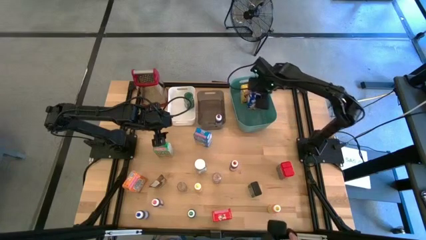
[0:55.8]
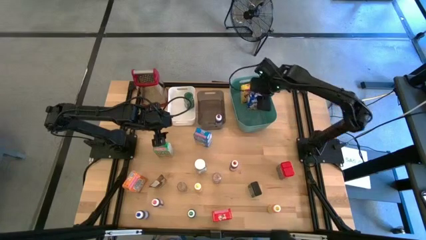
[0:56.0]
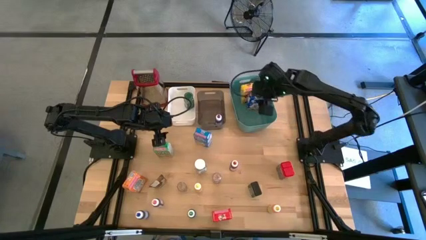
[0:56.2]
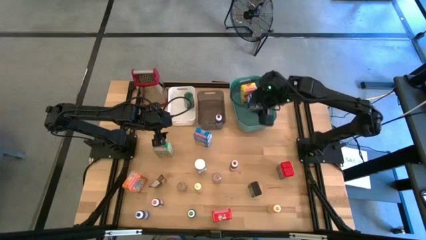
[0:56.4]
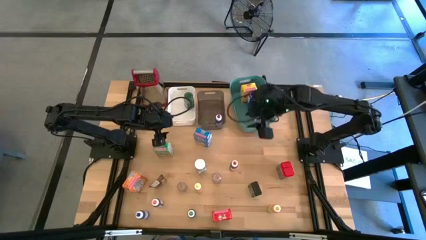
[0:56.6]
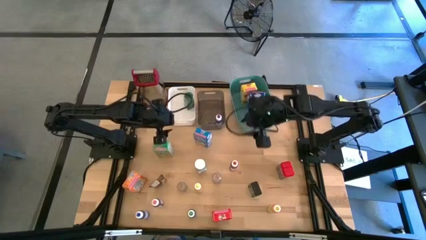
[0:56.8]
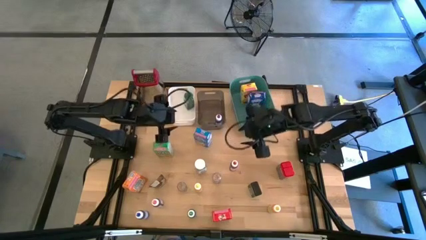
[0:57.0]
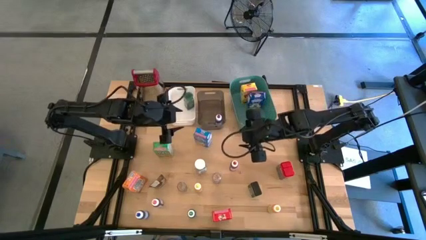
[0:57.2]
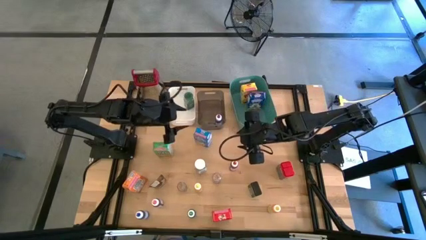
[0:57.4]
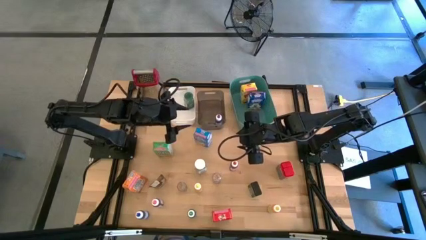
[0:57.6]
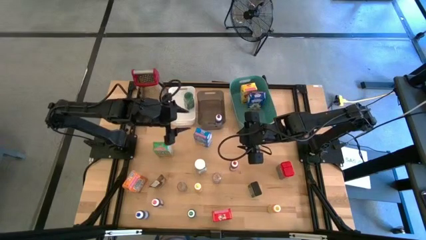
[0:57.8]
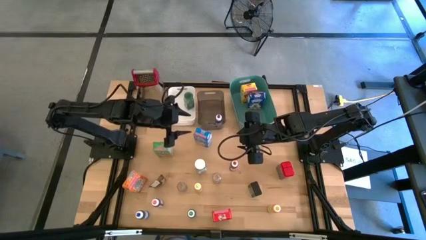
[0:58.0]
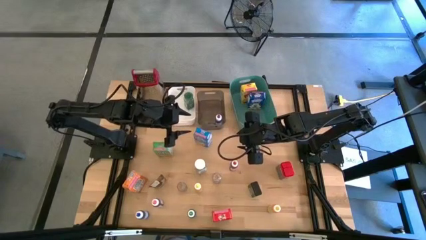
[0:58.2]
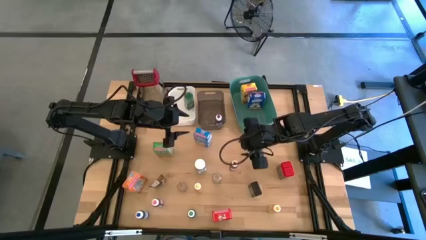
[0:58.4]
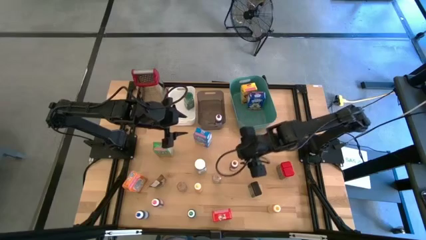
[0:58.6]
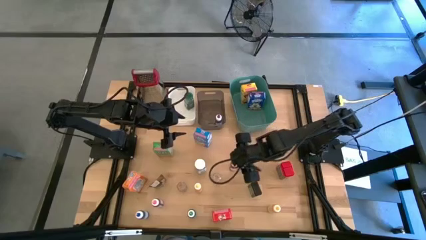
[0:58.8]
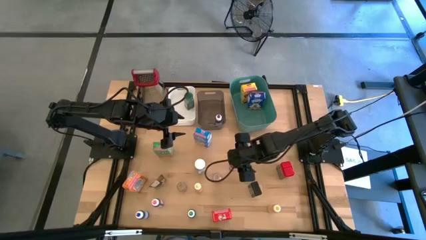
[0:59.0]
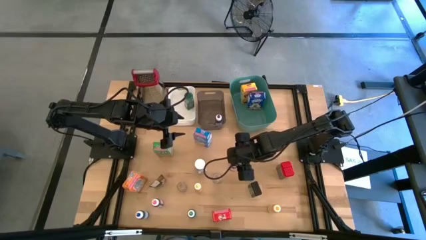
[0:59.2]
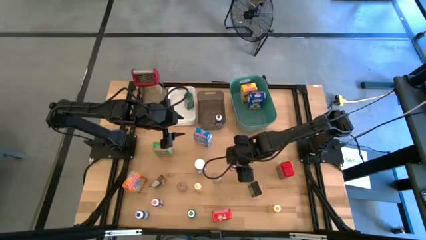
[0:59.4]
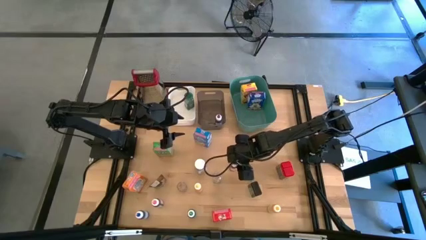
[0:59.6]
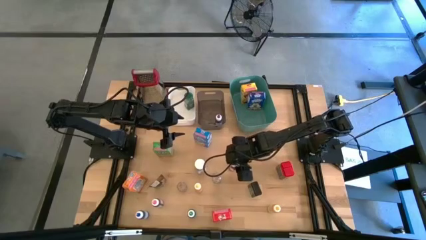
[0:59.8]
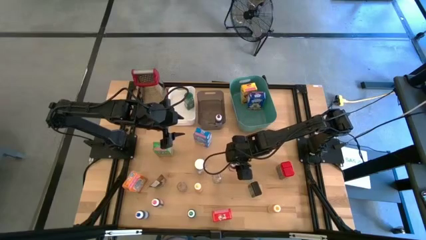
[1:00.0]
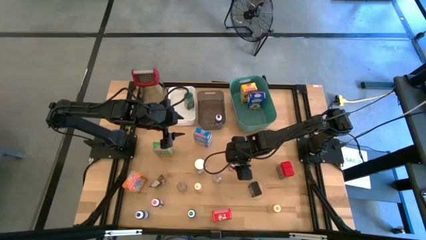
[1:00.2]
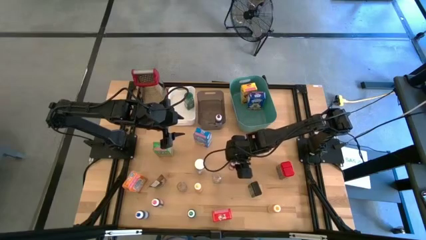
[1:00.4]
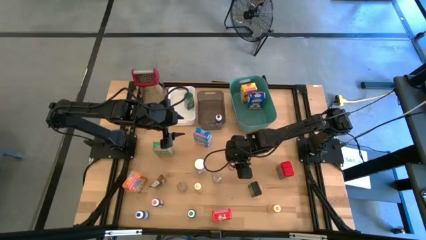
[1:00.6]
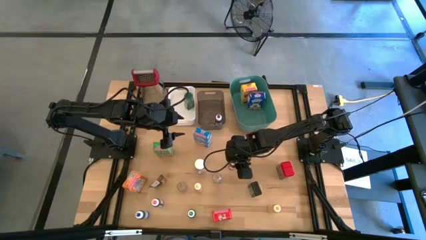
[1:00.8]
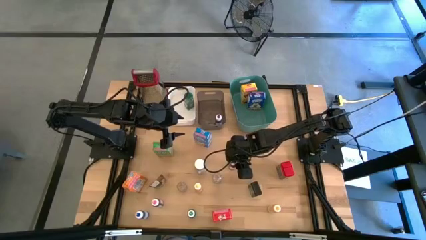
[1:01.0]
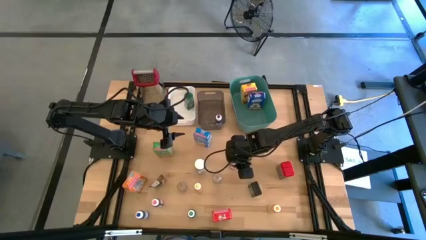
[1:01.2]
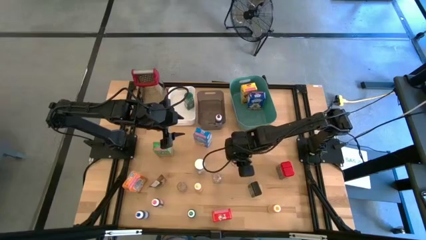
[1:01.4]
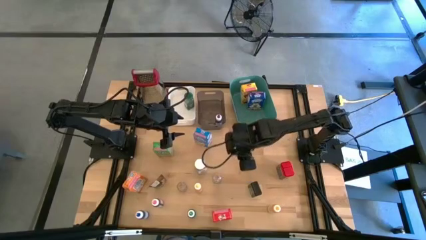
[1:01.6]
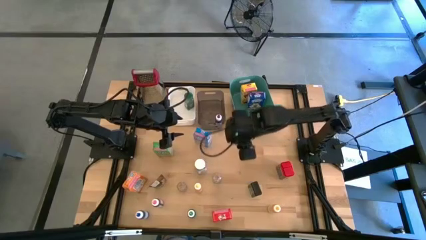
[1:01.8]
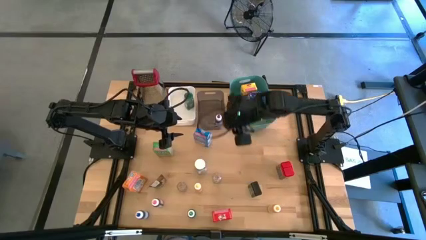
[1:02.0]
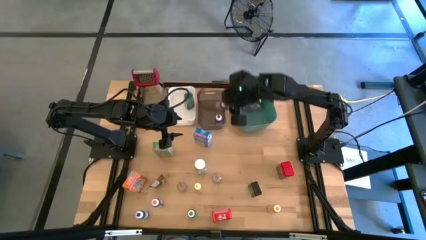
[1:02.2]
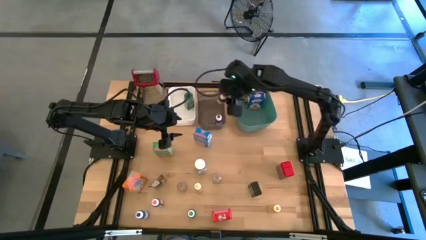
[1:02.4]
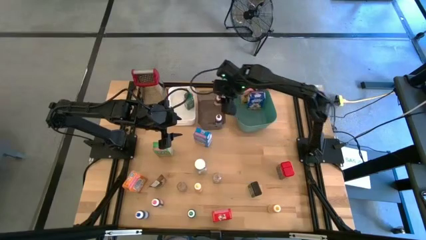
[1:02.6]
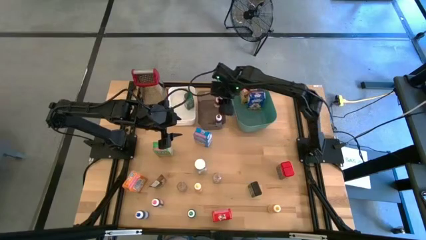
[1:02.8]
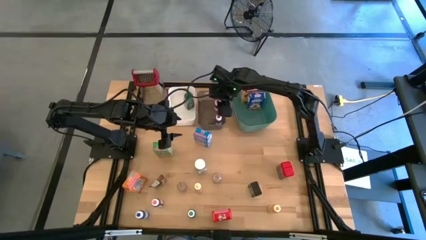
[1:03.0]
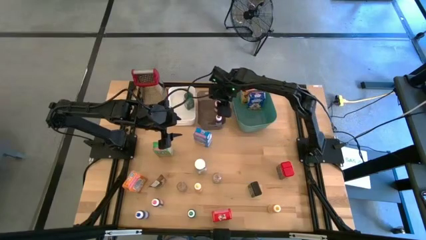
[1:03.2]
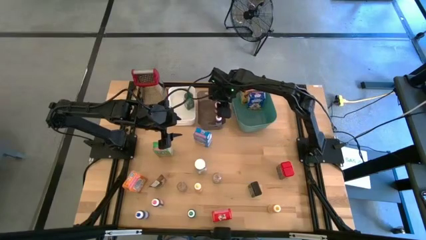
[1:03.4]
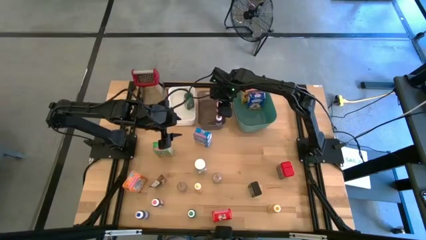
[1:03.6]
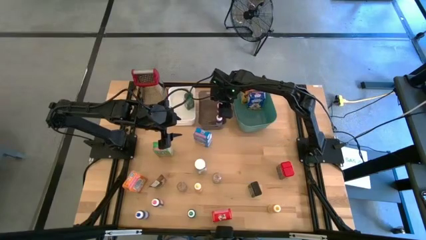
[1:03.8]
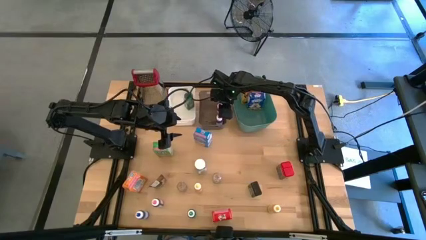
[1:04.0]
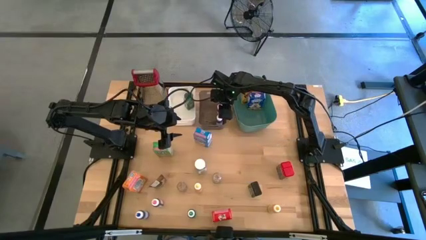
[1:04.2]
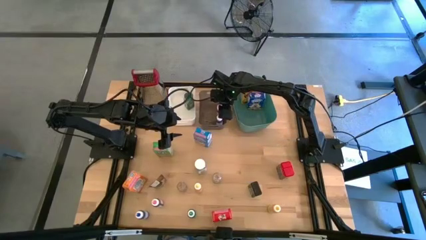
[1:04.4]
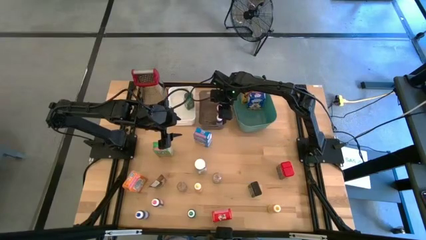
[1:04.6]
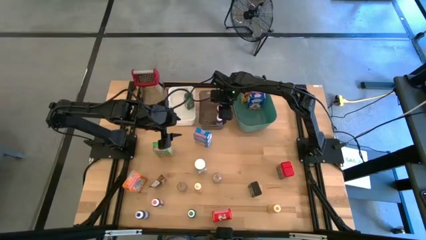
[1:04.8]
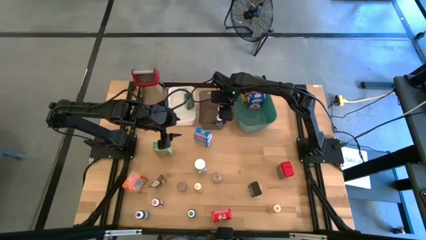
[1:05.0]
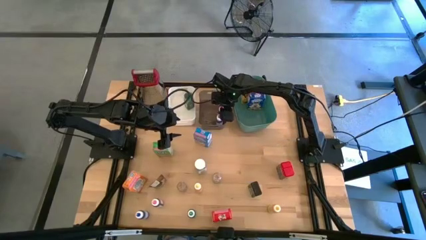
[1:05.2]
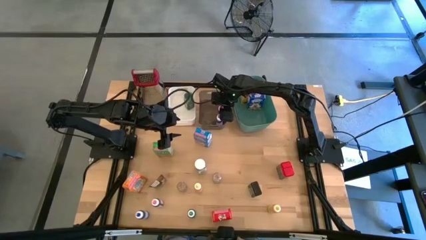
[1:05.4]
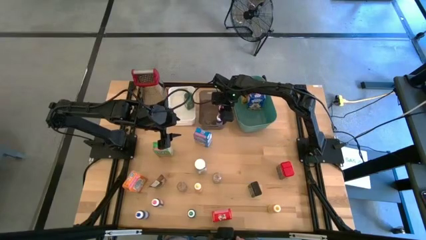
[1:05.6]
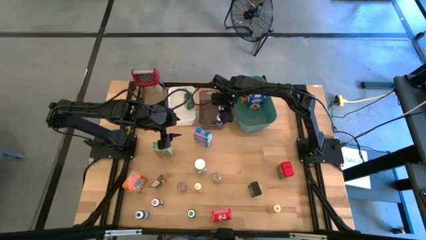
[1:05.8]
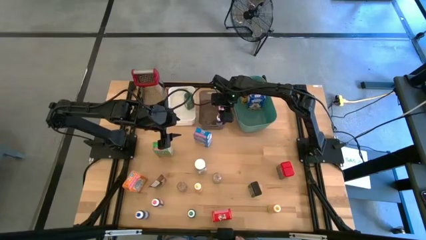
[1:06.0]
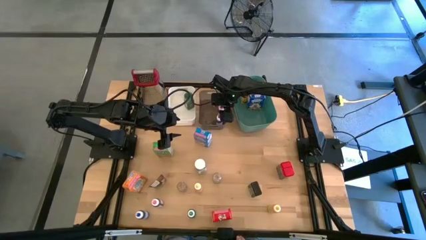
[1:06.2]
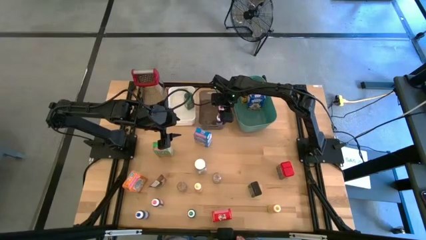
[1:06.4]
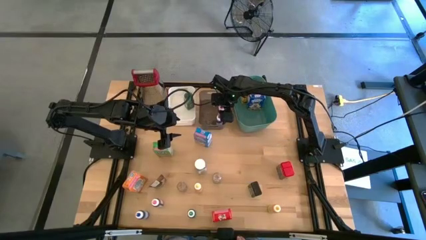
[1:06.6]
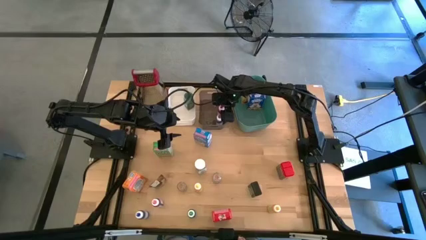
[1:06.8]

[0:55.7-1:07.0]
Task: Pick & Place Kitchen Items
Put the red food coloring bottle into the middle black transparent bin

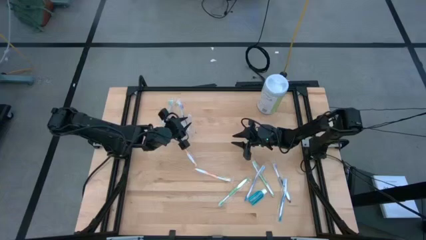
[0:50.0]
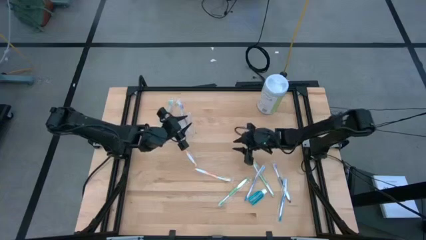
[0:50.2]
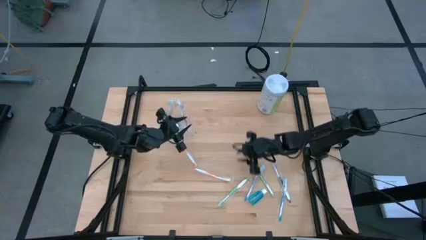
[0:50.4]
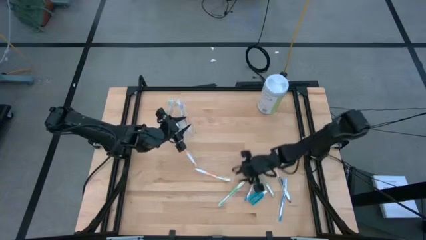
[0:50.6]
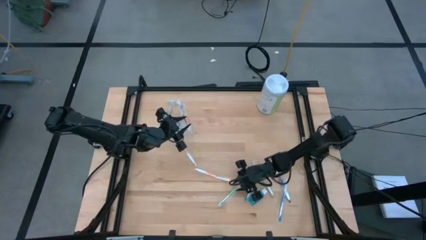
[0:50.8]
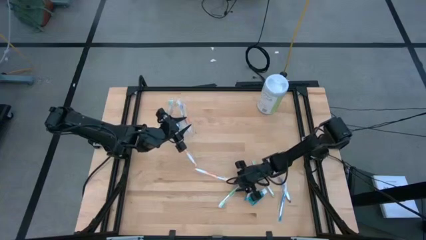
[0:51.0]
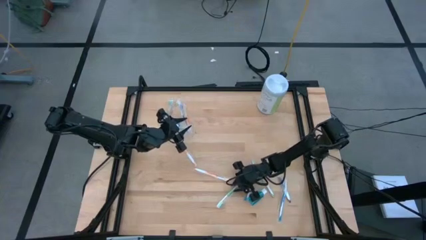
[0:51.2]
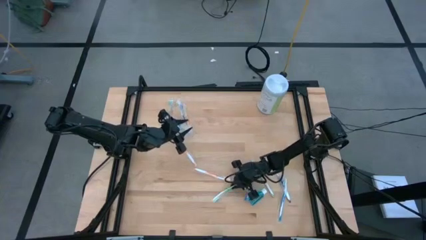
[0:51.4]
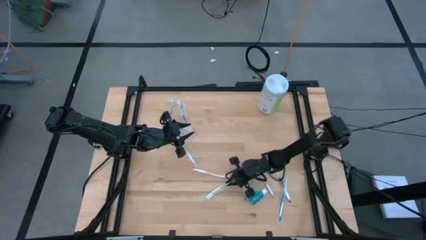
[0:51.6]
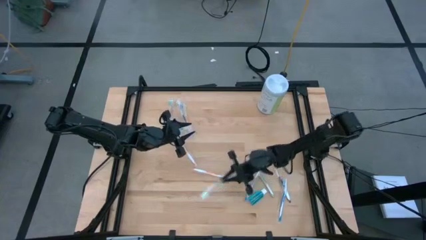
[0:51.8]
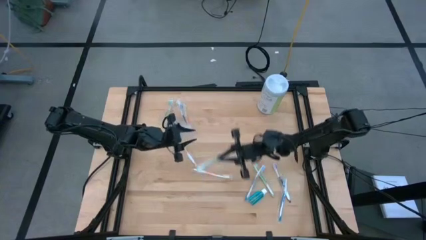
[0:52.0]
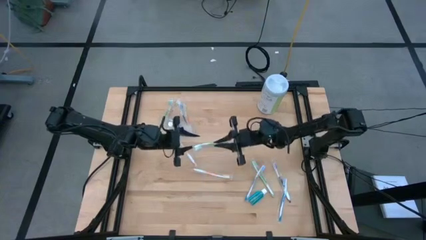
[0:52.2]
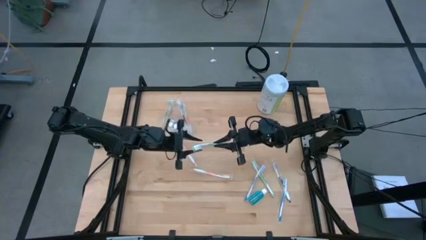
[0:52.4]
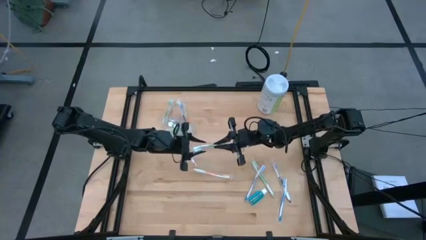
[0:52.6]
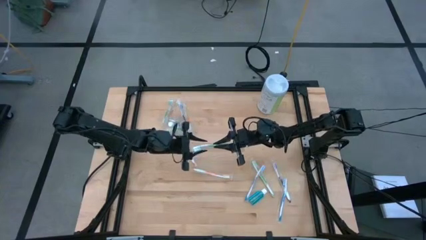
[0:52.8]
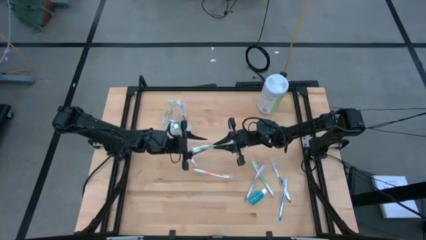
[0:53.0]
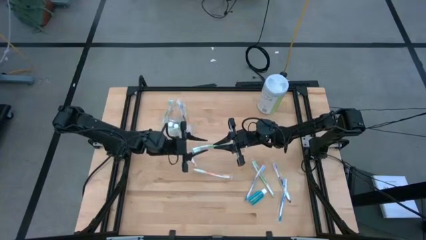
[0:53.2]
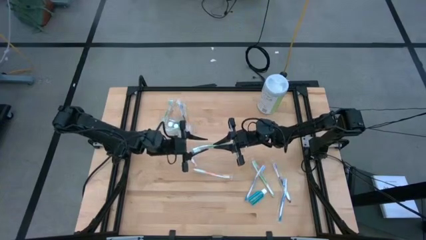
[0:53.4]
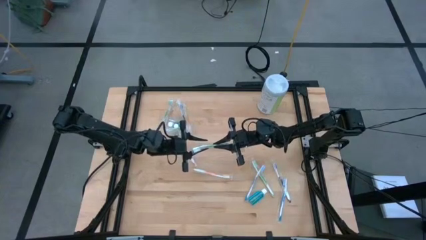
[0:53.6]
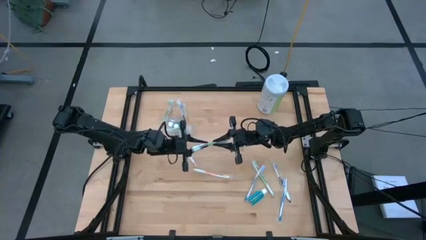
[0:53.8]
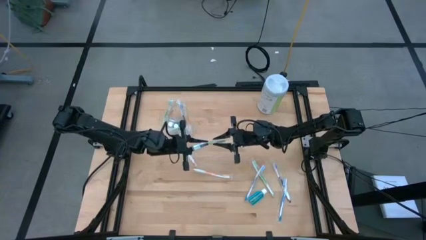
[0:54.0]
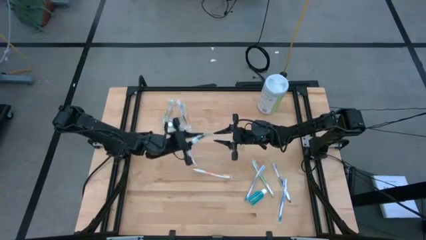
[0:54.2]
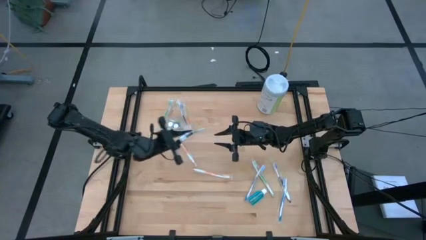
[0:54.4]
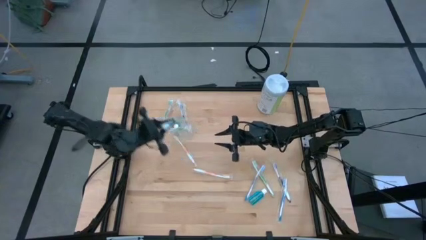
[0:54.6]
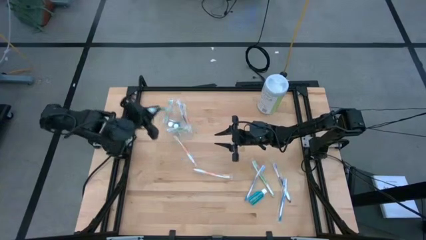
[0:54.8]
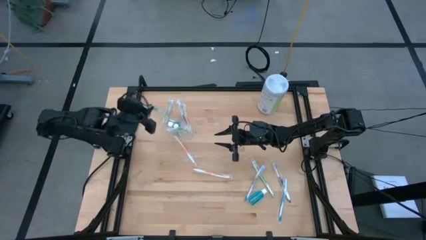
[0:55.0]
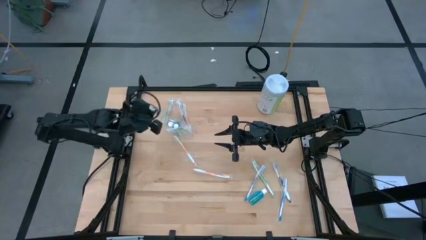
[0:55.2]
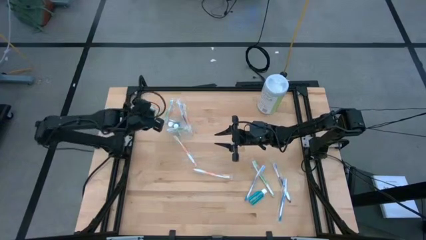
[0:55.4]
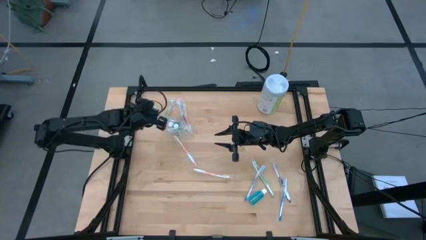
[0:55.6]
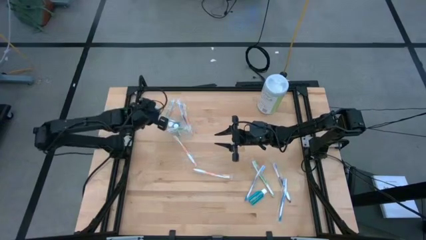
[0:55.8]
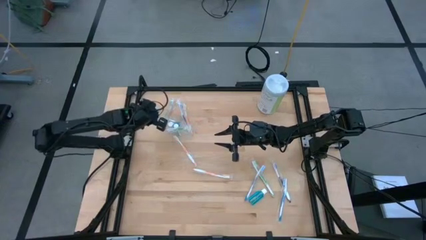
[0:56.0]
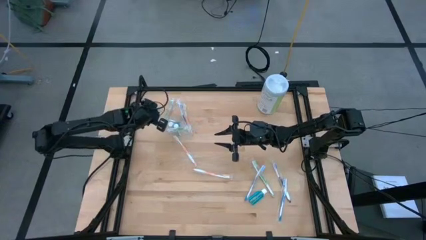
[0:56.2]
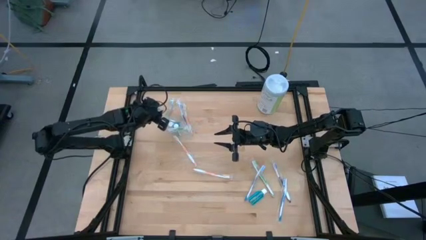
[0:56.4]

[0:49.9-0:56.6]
Task: Pick & Place toothbrushing station
Put the green toothbrush into the transparent organizer
